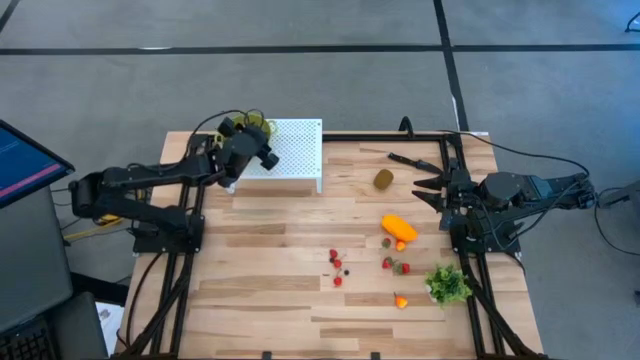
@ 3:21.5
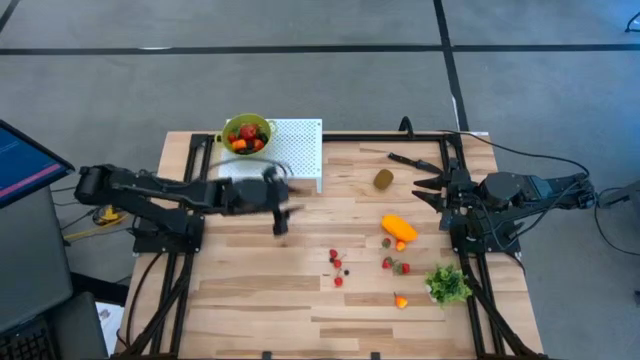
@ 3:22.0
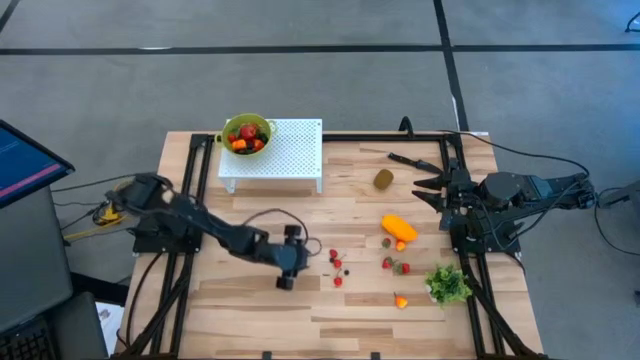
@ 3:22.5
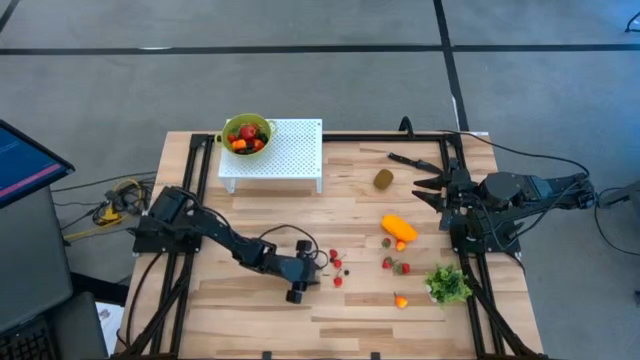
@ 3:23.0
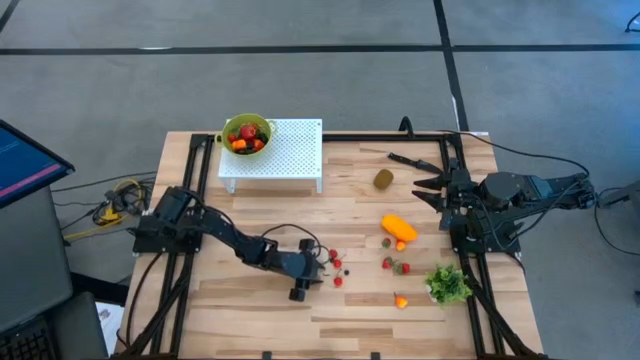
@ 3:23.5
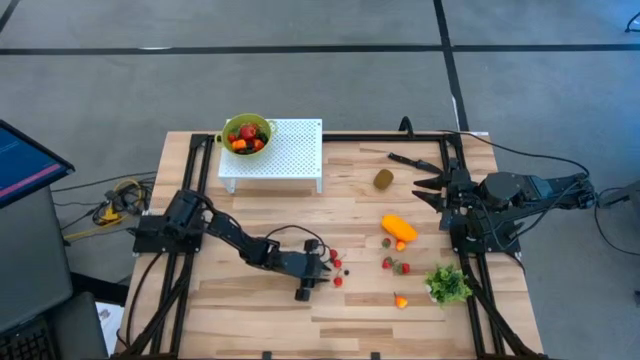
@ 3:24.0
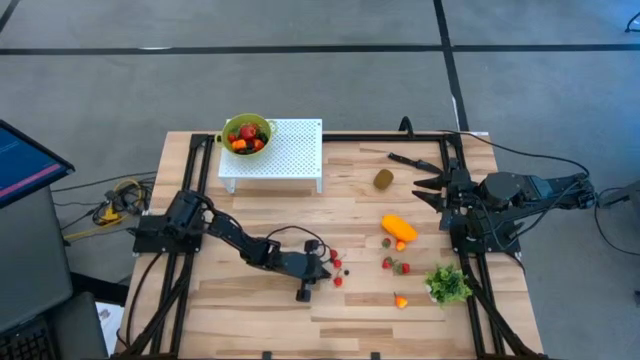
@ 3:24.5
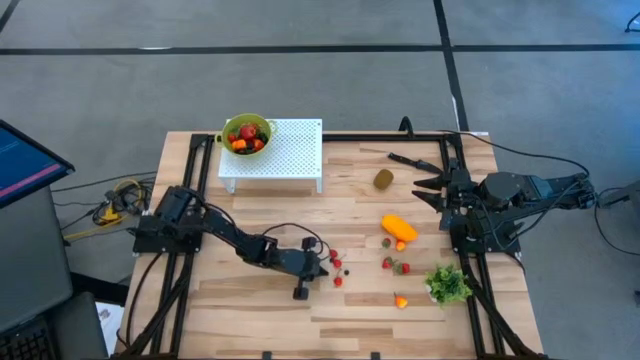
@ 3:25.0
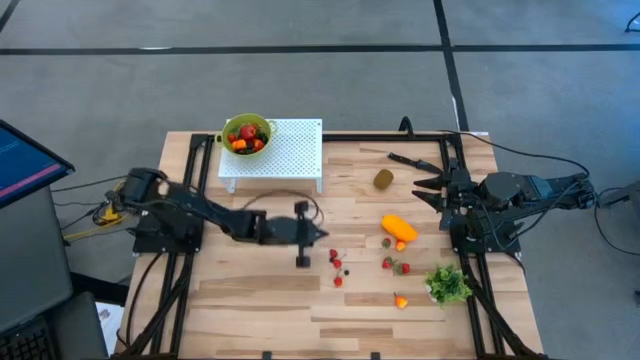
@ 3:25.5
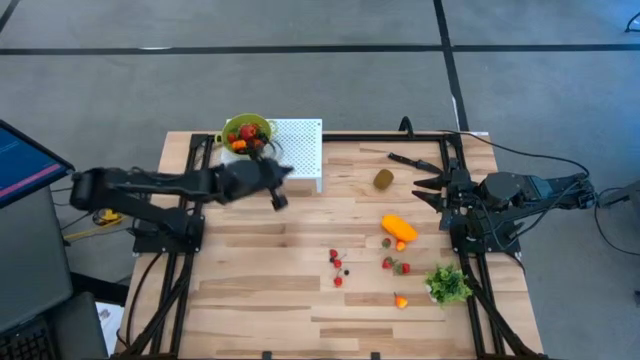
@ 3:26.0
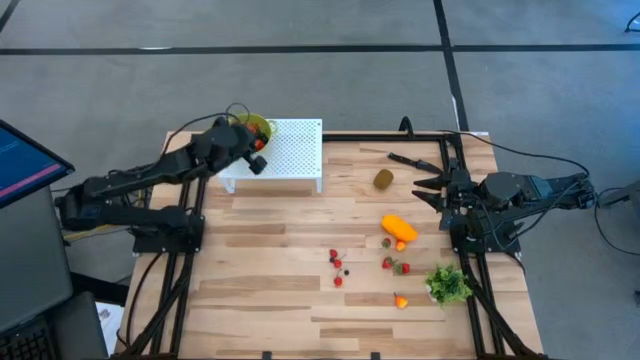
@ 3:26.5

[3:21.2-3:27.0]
Task: Pick & Place Fruit
Put the fruit stem into the green strainer bowl on the shelf

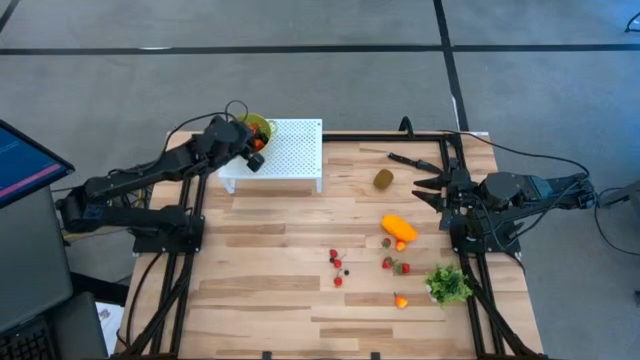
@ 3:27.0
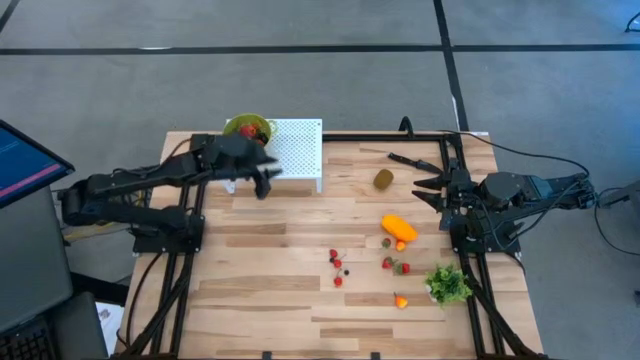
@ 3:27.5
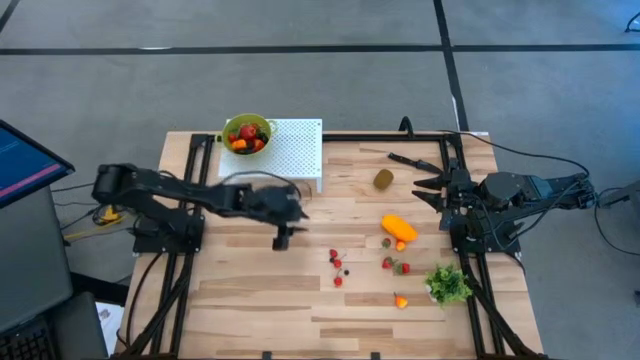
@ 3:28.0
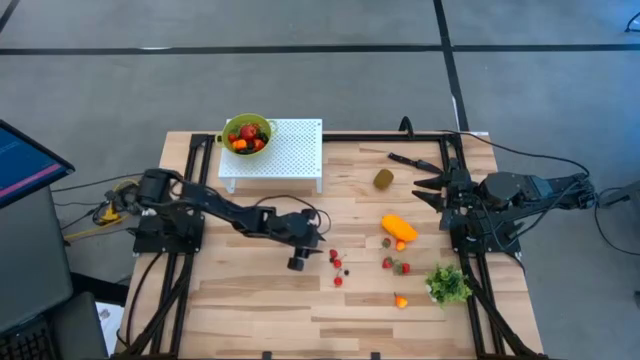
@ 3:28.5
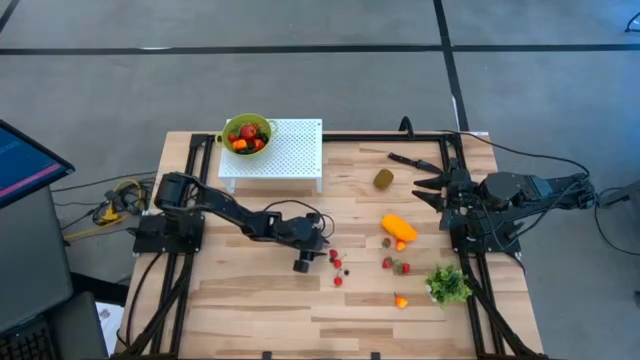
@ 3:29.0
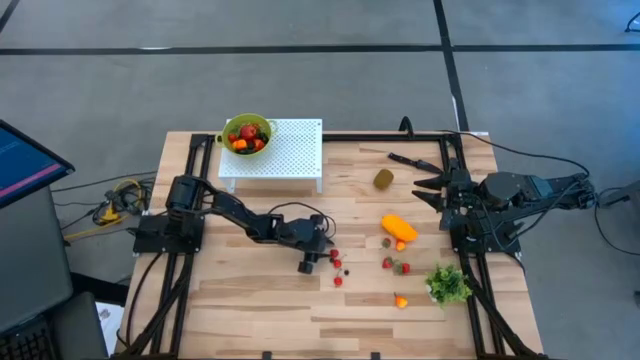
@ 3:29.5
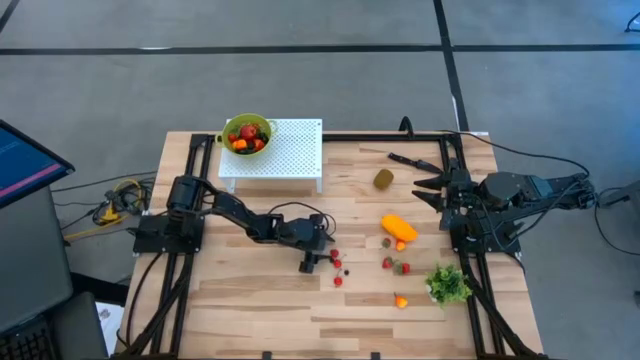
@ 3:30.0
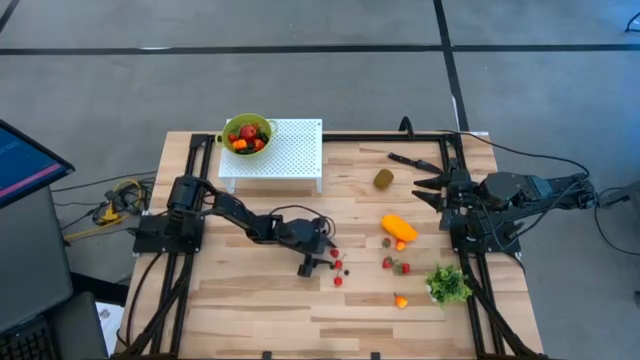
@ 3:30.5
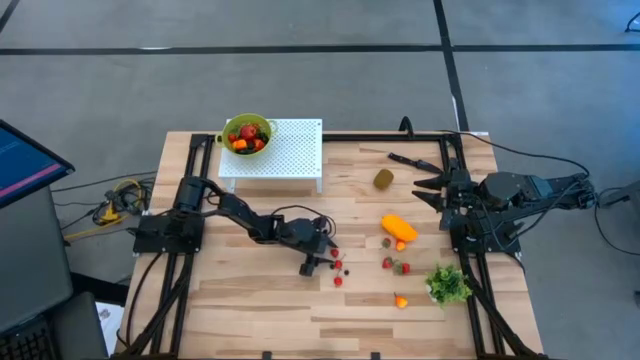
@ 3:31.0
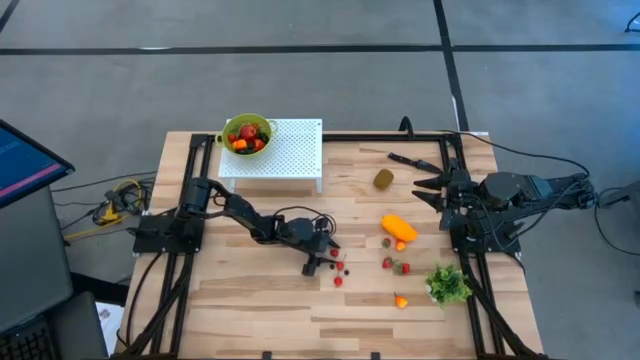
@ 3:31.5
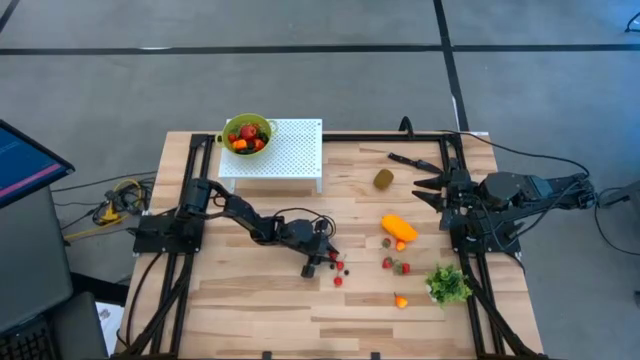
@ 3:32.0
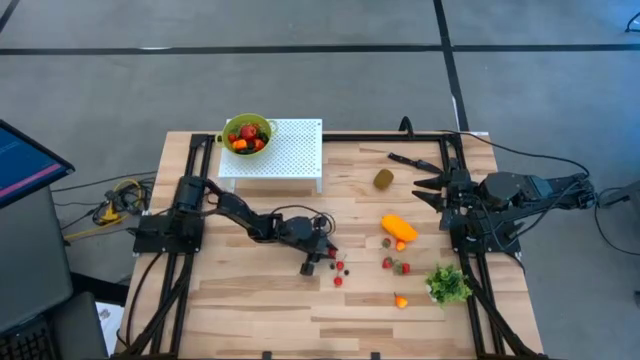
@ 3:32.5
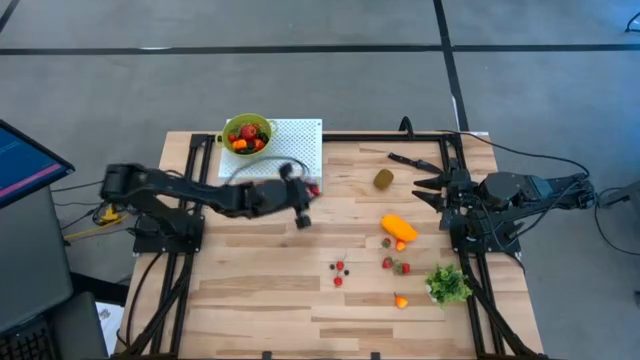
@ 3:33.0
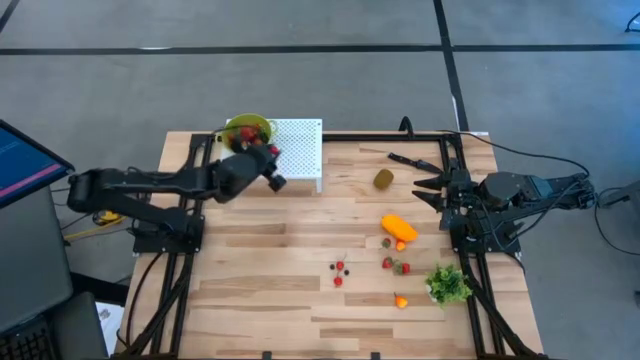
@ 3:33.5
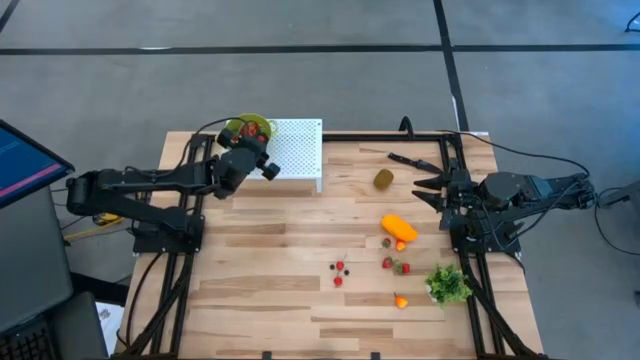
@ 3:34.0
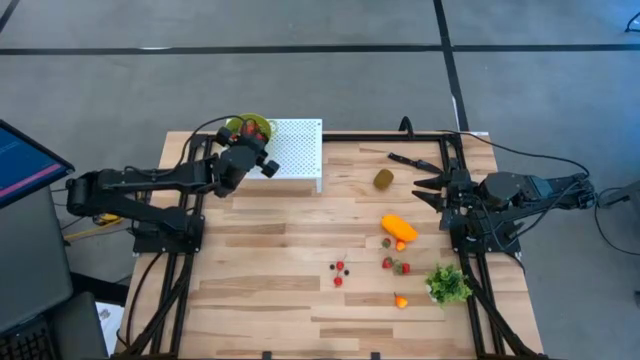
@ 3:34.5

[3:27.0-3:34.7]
Put the raspberry into the green strainer bowl on the shelf

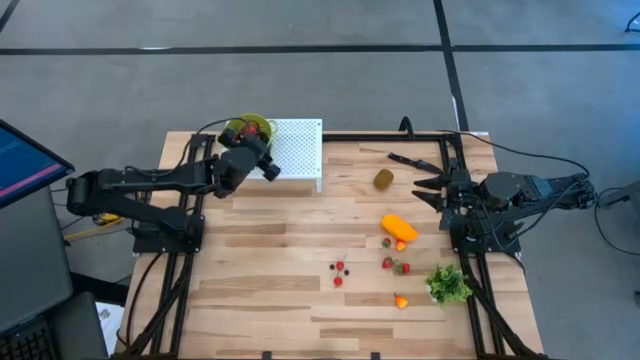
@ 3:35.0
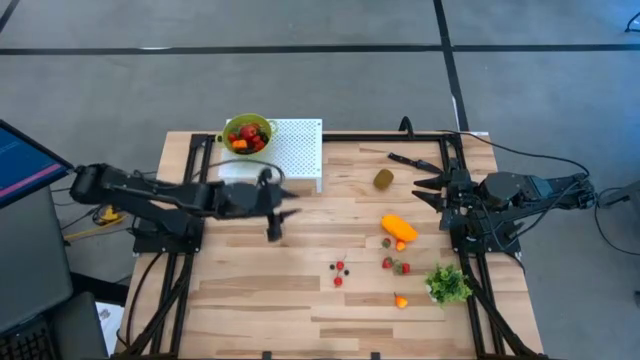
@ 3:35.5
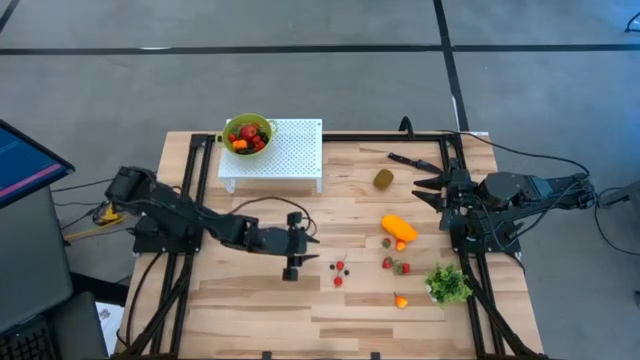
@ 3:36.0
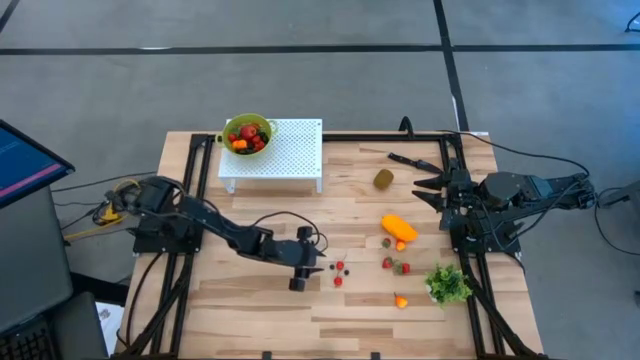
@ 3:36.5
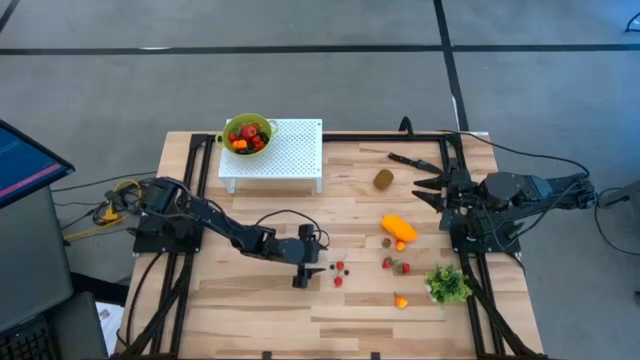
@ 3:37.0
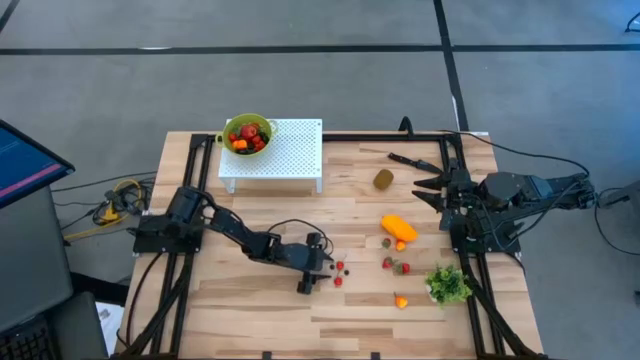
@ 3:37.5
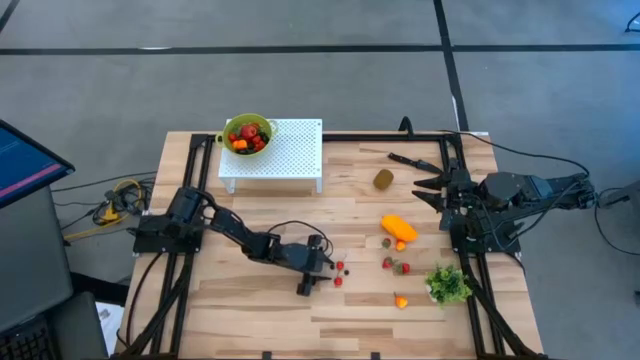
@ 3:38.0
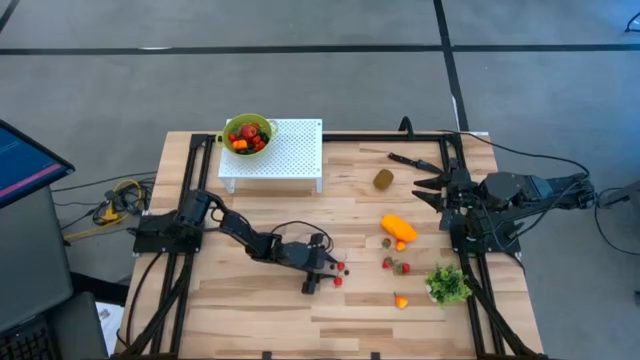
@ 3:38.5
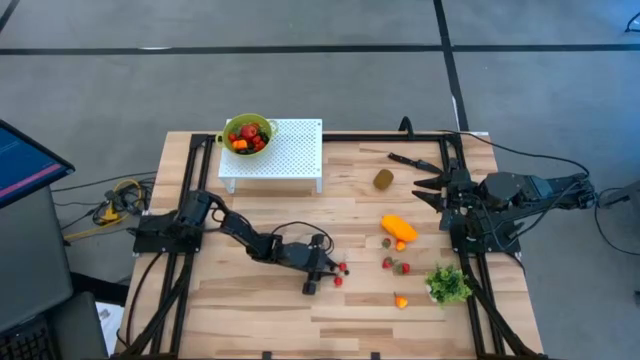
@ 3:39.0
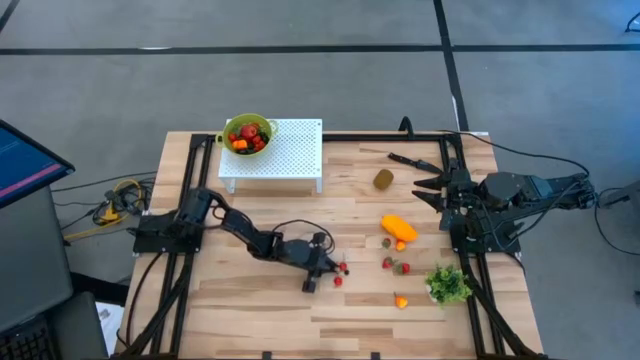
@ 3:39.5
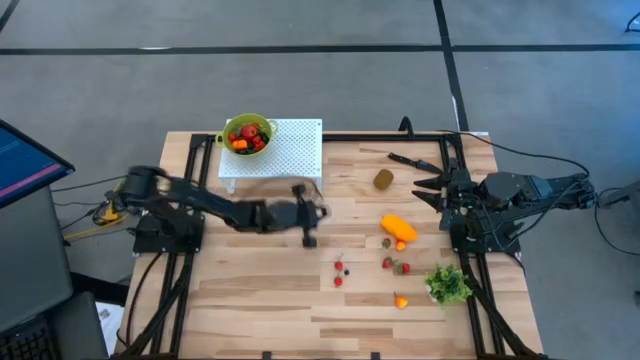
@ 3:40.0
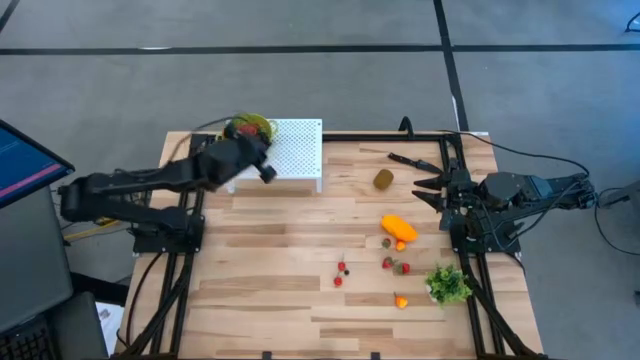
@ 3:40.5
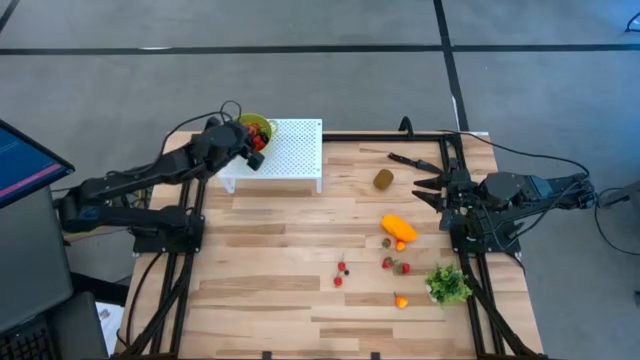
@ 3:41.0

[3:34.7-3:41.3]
Put the blueberry into the green strainer bowl on the shelf

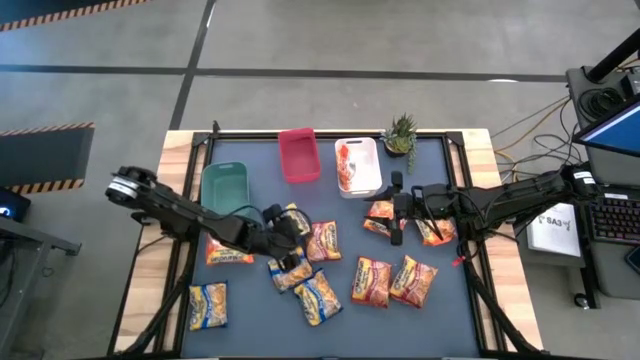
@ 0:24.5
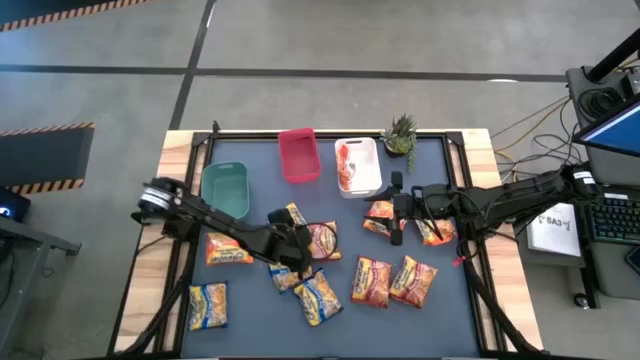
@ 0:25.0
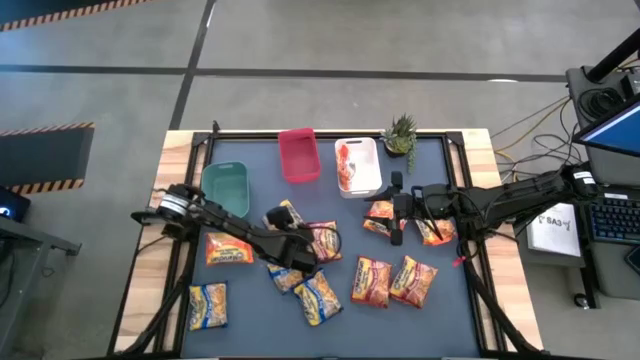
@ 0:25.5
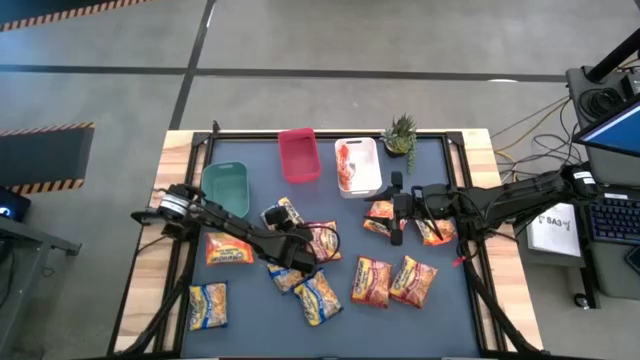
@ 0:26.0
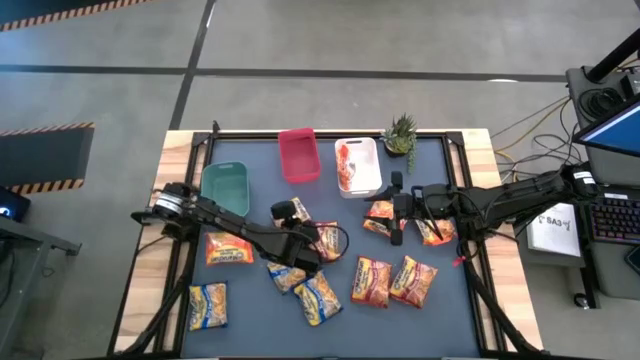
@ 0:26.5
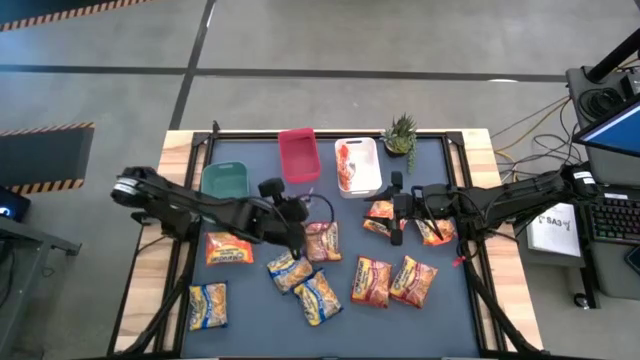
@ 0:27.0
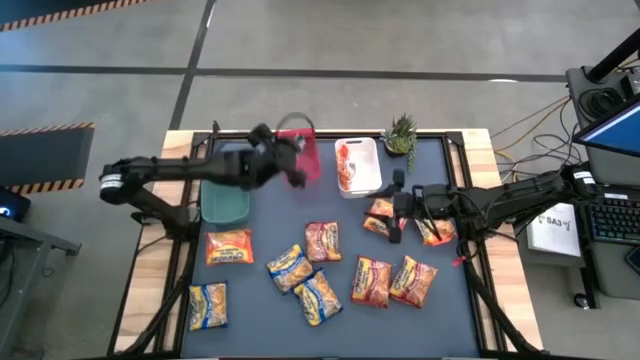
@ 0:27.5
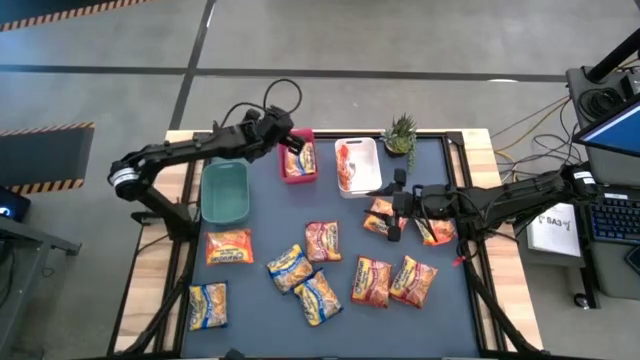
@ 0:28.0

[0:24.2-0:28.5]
Task: Sort Maruchan noodles
Put the blue noodle pack into the red bin
